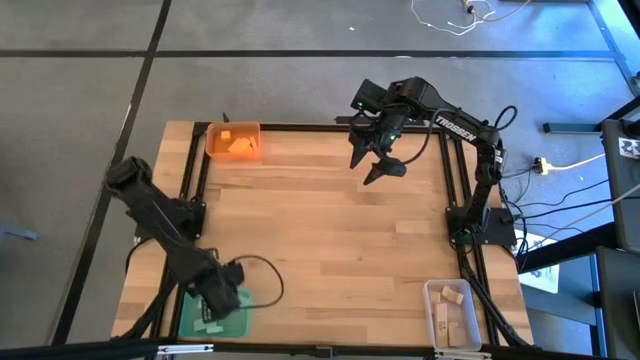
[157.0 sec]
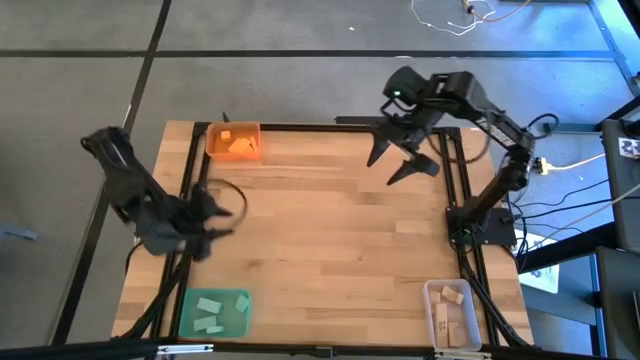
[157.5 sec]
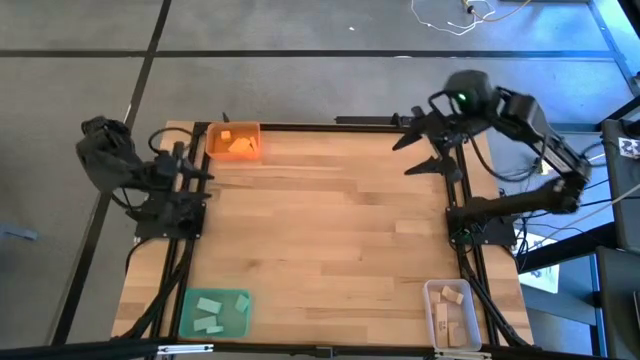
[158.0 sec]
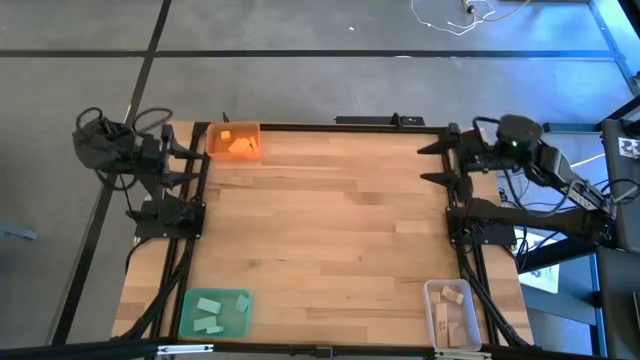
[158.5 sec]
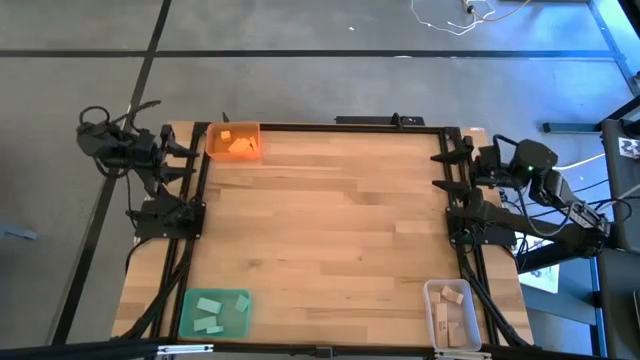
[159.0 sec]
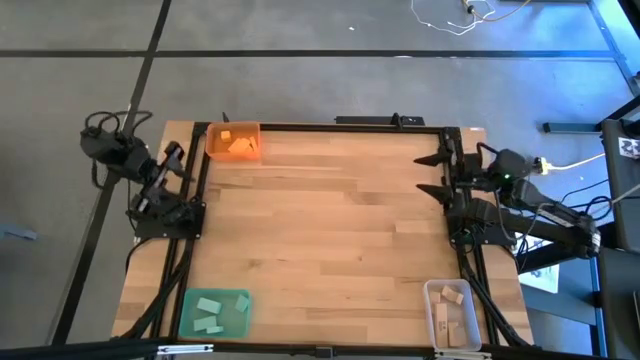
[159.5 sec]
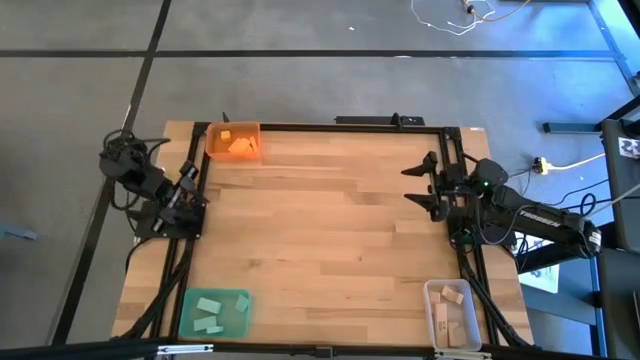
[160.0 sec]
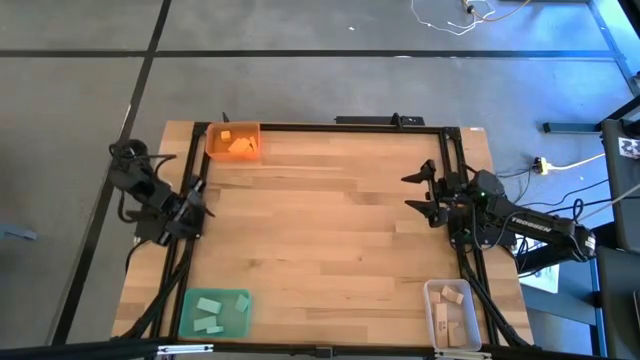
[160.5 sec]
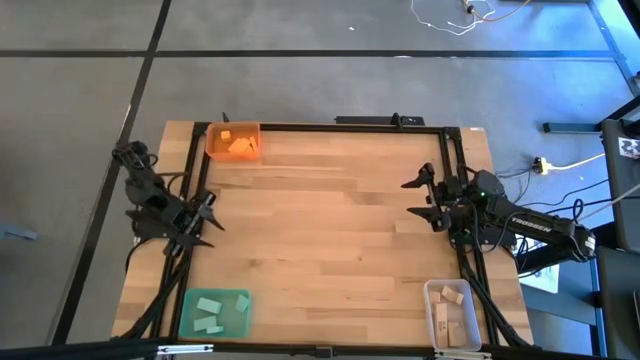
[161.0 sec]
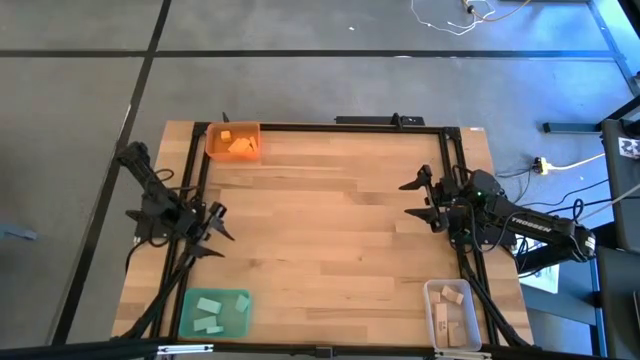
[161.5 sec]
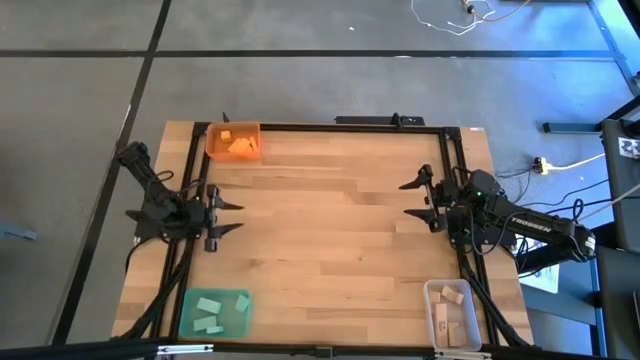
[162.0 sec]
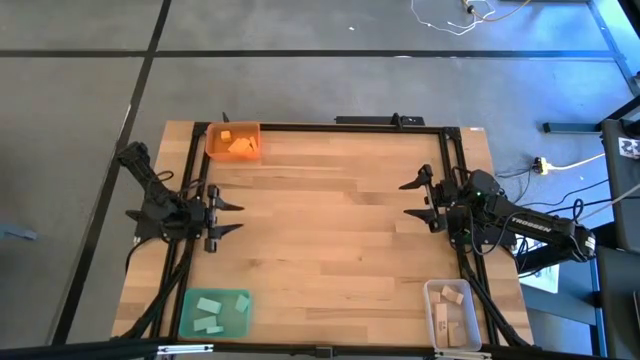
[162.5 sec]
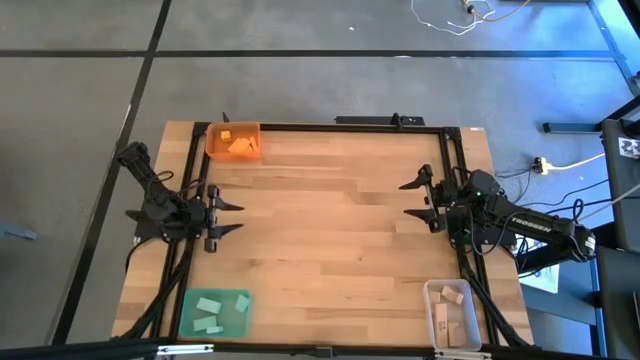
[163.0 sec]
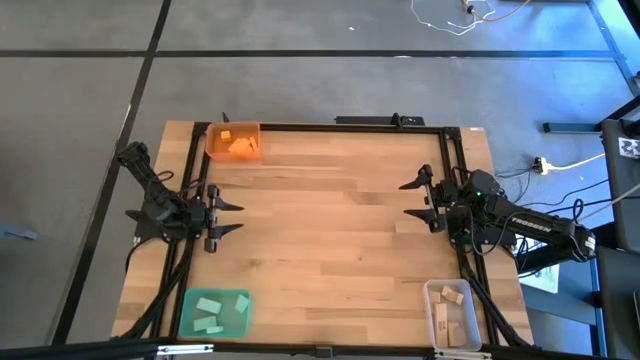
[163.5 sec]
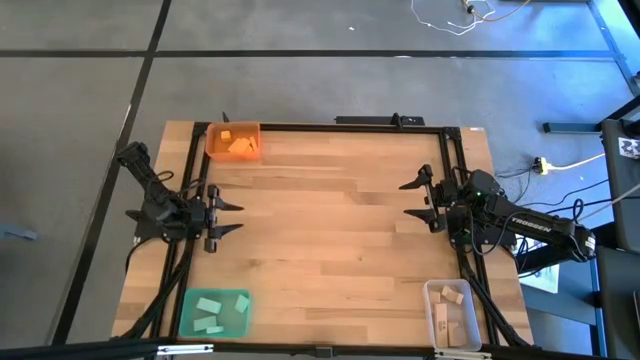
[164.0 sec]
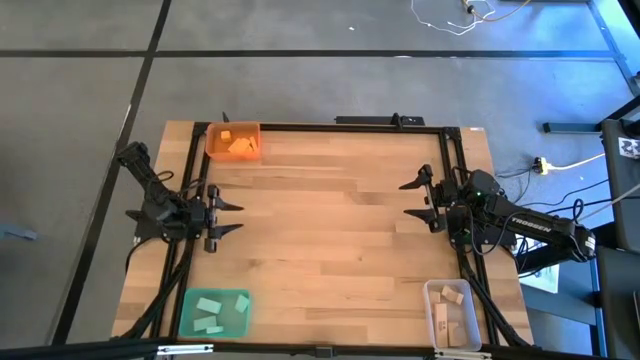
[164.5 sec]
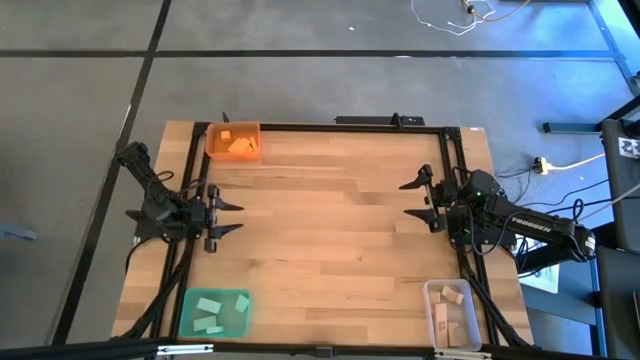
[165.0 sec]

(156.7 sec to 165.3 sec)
Task: Sort & place blocks by color
Return to Home Position

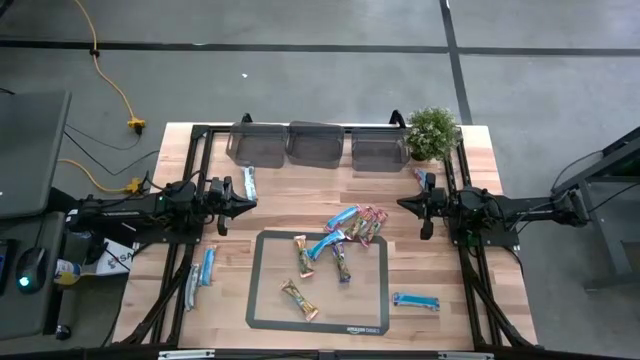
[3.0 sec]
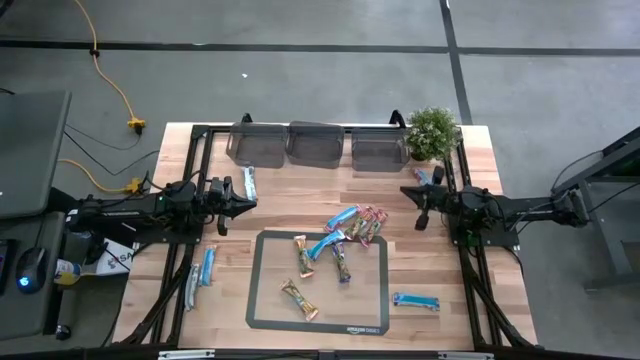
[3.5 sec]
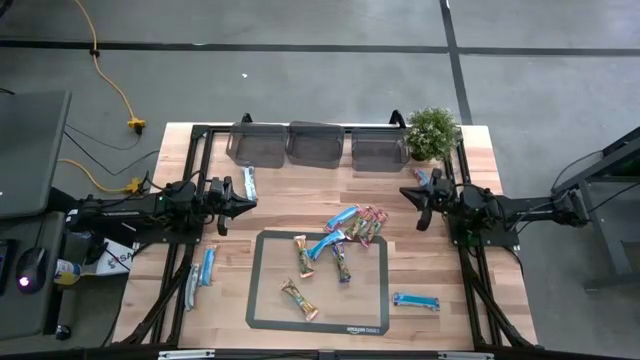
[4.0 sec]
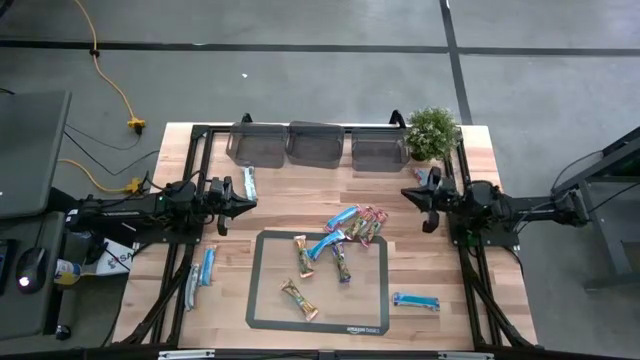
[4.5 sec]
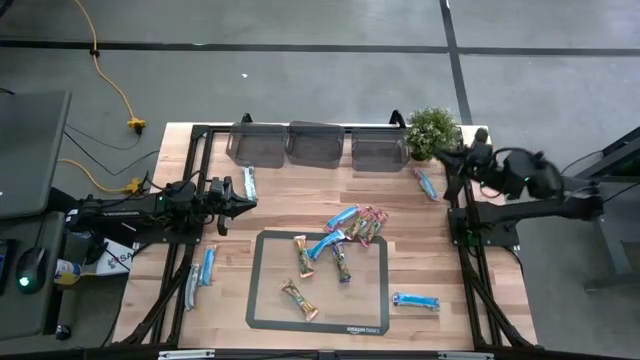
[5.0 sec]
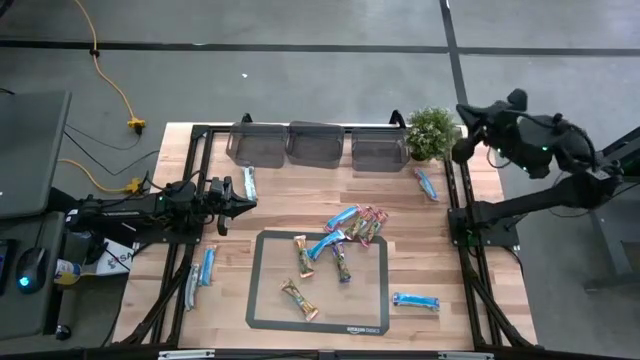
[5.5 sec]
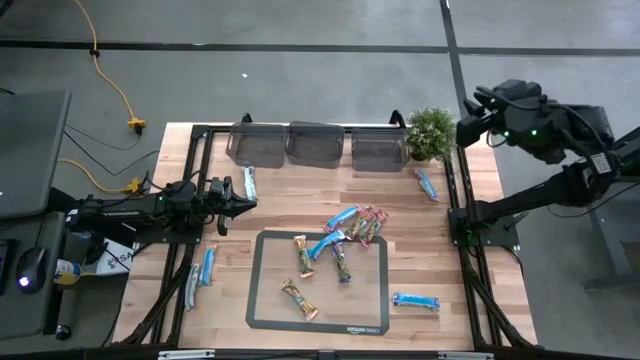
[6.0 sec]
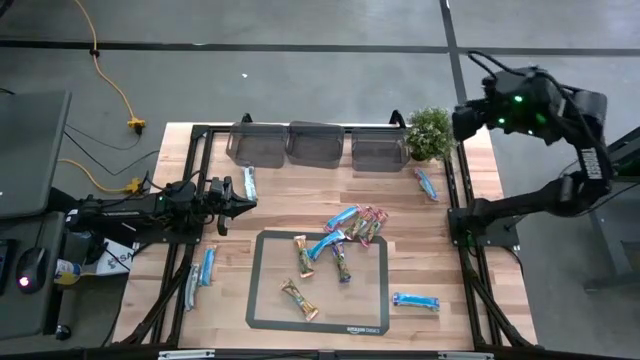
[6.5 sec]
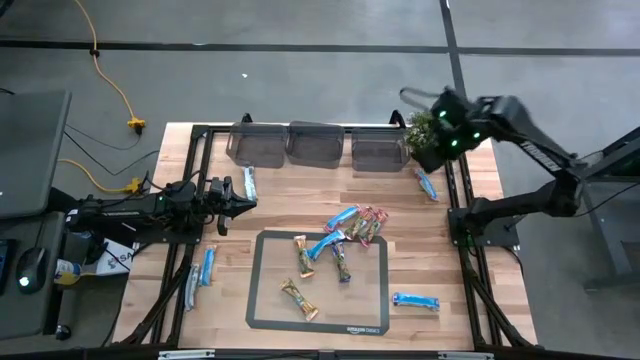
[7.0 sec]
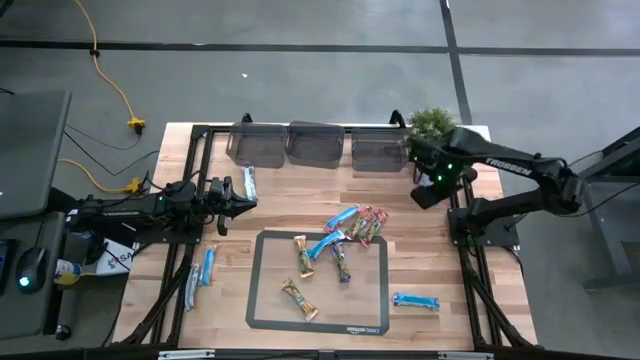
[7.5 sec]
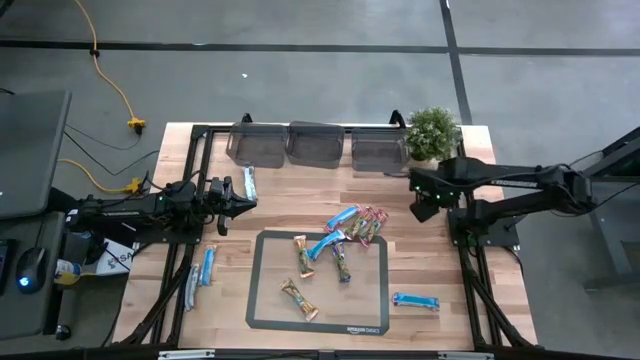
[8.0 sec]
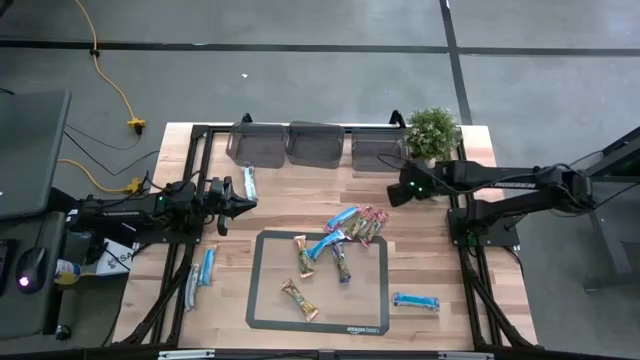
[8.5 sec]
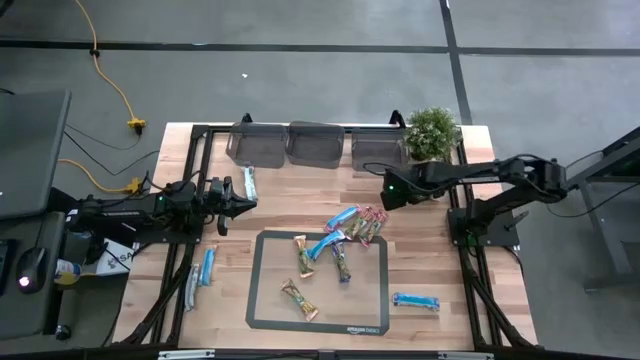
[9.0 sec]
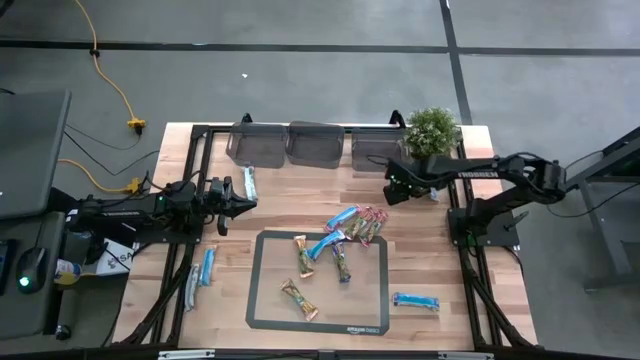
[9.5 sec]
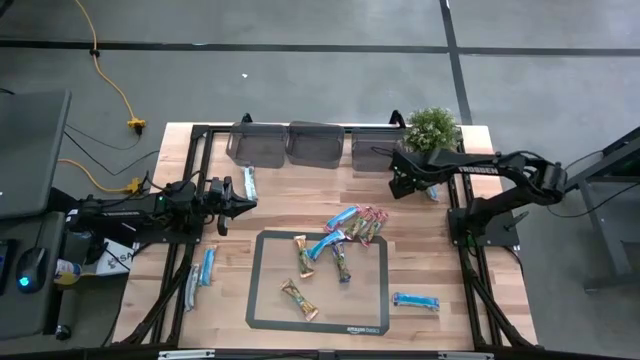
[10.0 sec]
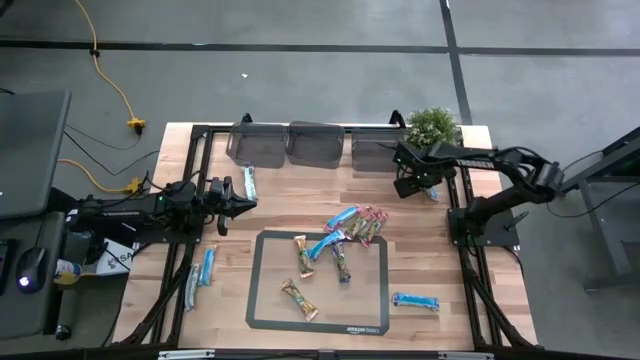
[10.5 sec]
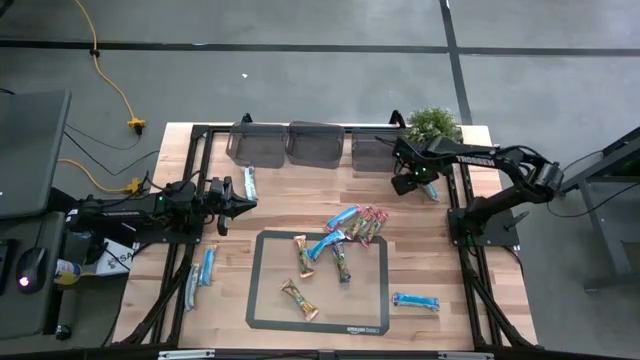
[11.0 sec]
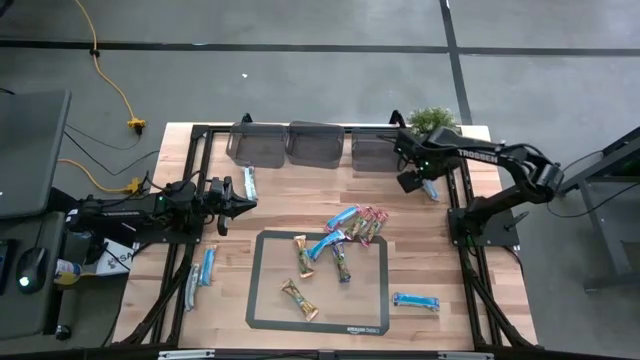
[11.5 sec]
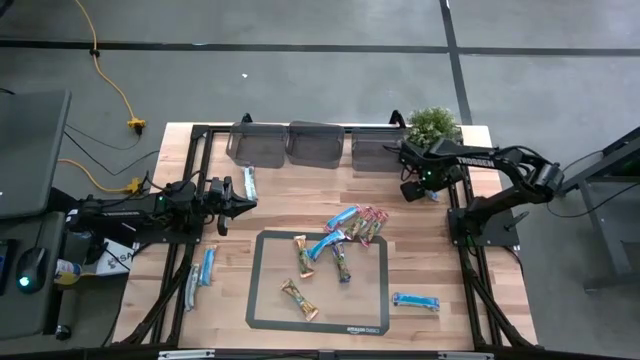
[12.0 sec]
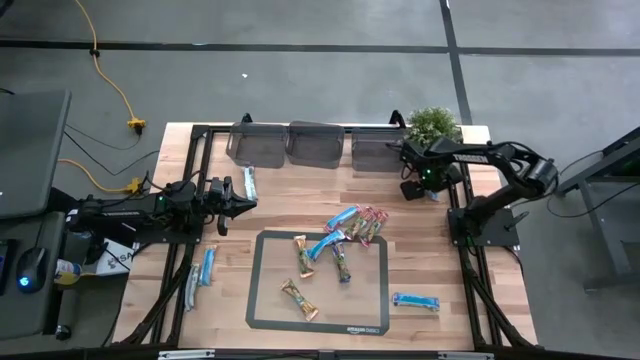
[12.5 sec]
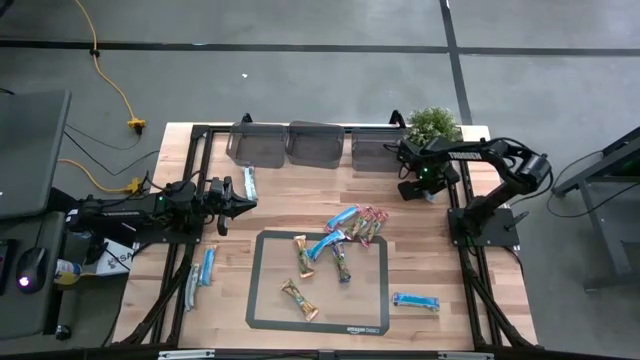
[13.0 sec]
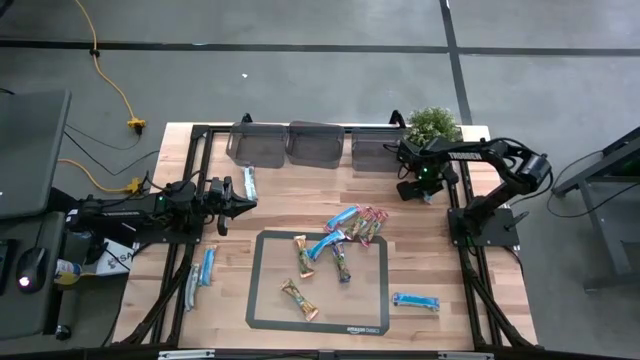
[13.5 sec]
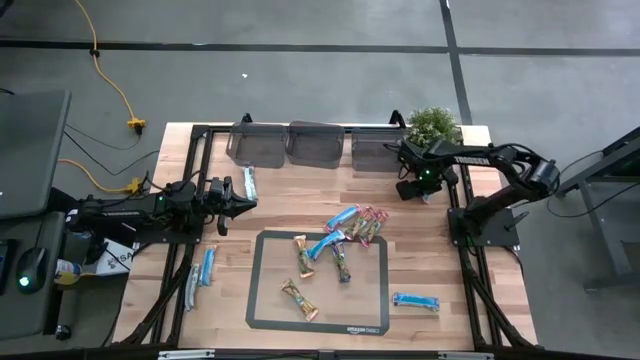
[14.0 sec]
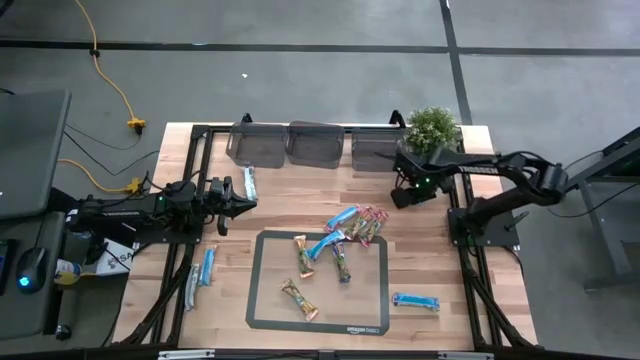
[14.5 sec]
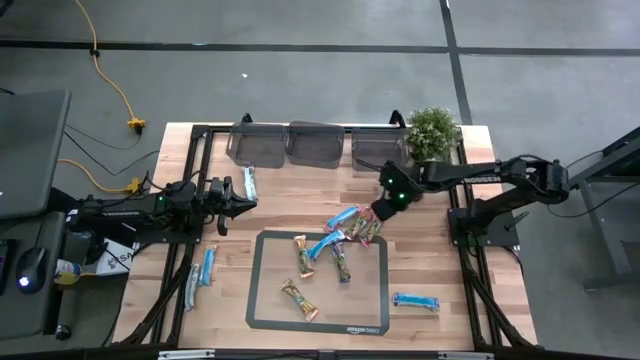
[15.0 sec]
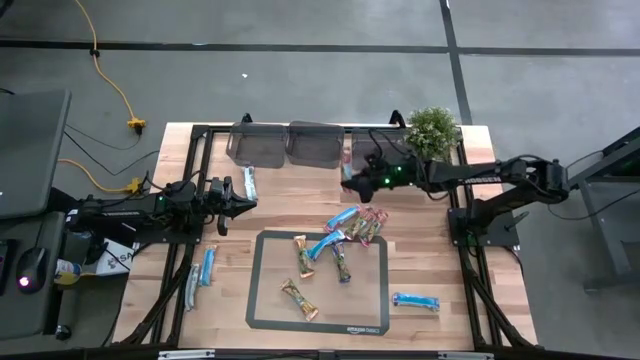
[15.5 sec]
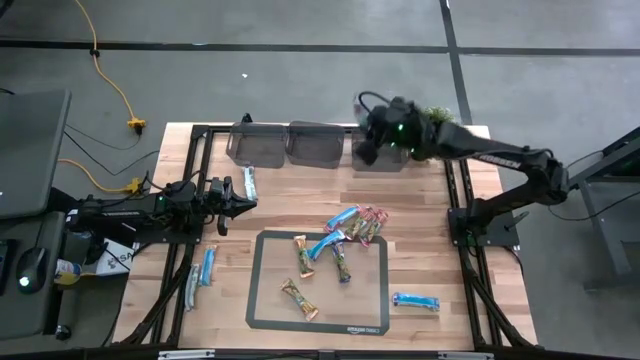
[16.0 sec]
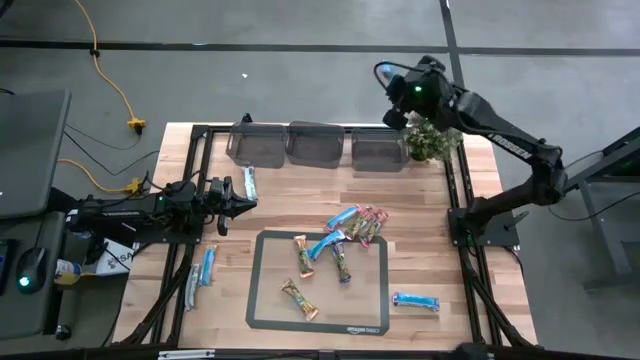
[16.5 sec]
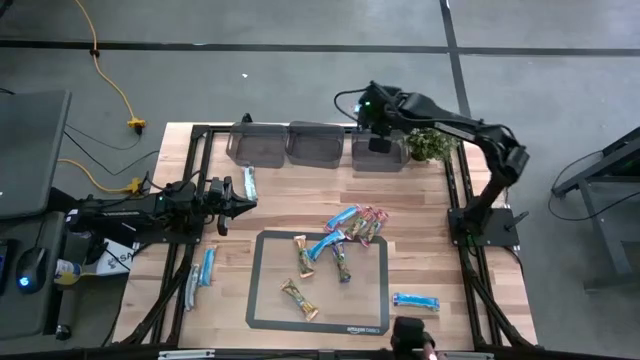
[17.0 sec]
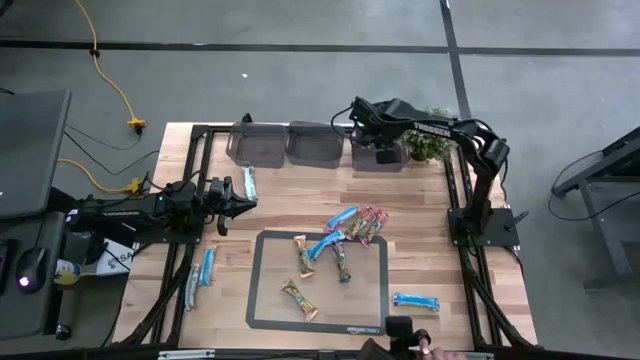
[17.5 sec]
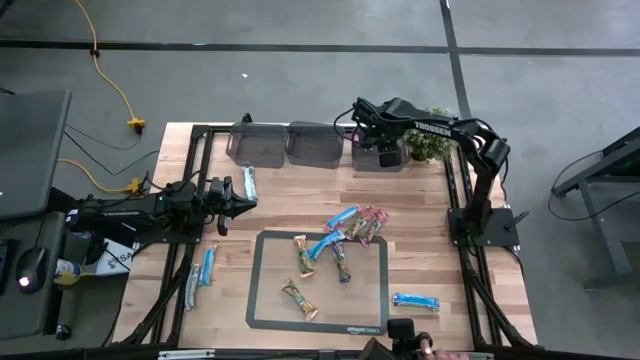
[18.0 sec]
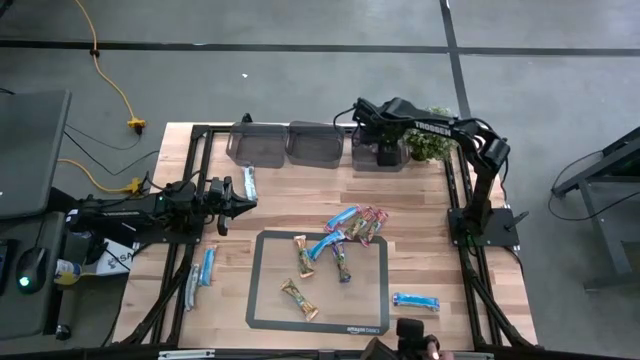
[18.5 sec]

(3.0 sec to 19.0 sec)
Task: Pick and place Granola Bars by type
Put the red granola bar into the right black bin
